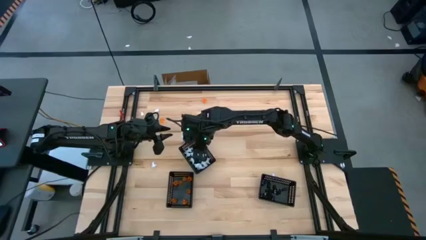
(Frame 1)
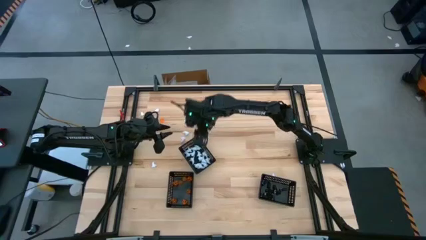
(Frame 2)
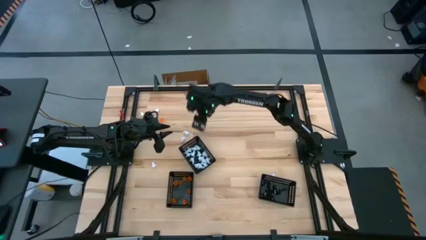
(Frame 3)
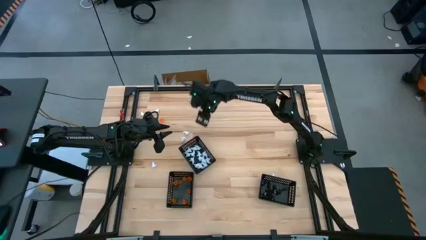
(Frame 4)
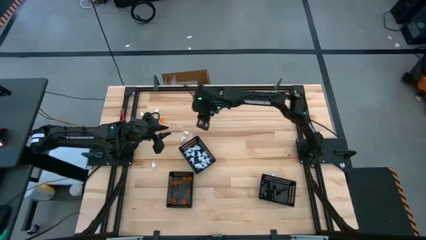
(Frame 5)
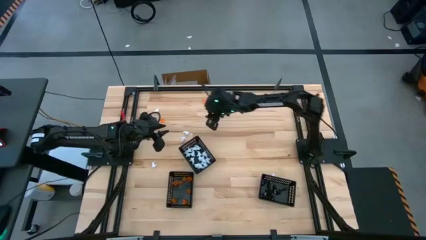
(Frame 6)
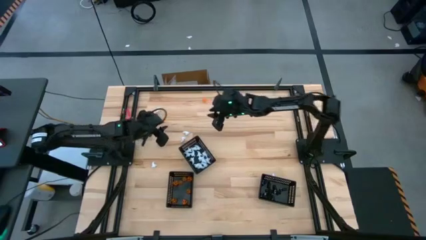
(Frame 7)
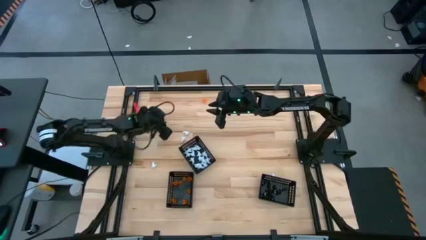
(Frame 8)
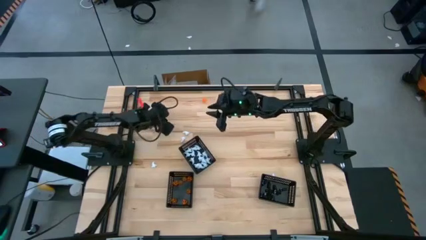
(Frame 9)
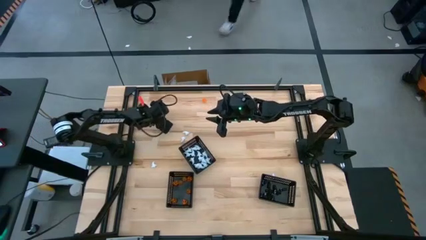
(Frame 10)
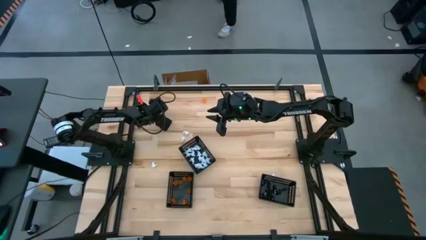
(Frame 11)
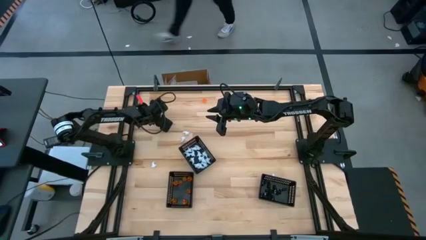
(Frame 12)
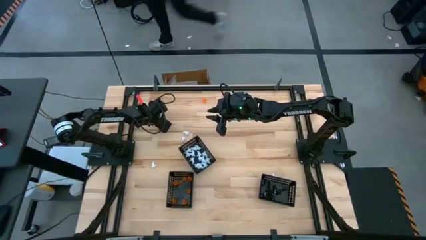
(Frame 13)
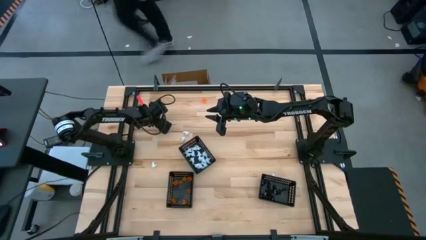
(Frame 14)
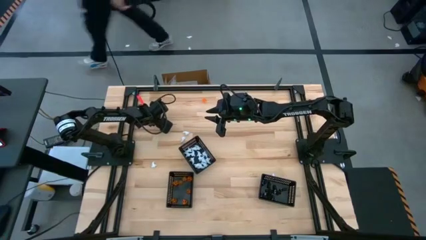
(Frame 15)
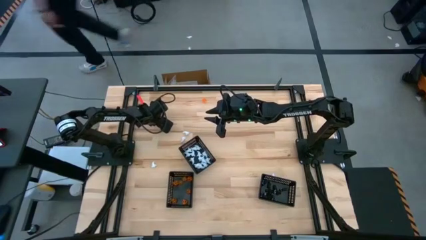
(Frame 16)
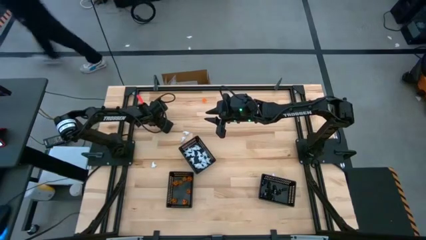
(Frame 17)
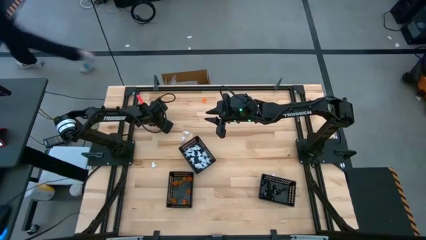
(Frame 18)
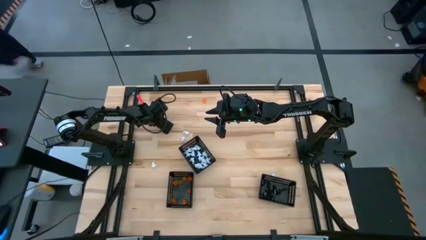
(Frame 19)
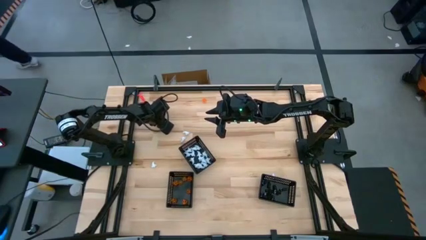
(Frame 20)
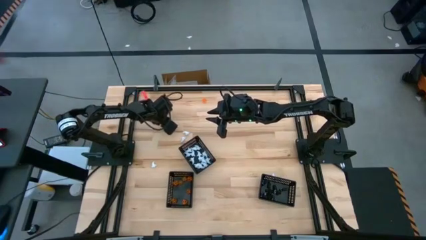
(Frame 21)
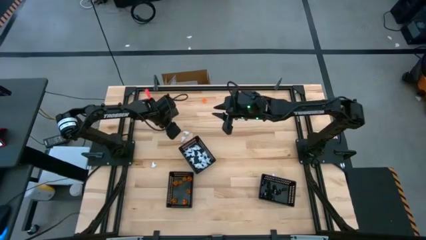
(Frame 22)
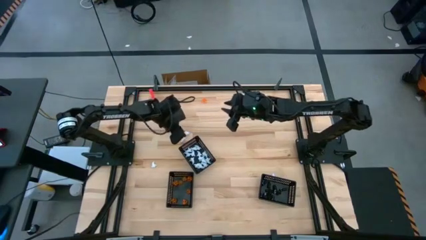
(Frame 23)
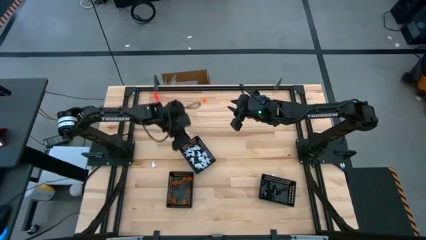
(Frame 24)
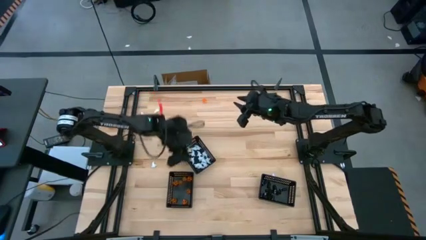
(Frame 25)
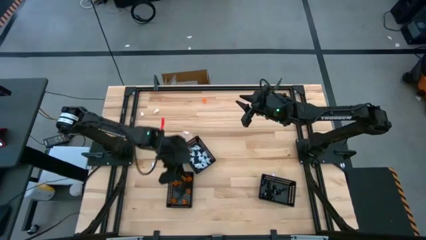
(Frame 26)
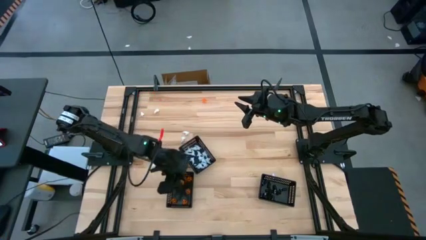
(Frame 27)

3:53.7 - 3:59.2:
Task: Sort Halloween decoration
Put the orange pumpkin toy into the left black basket

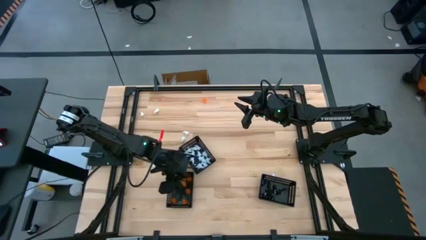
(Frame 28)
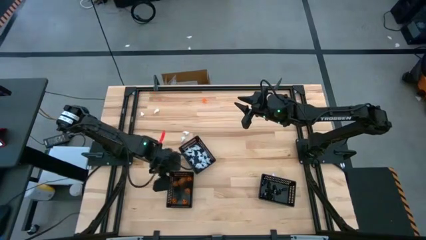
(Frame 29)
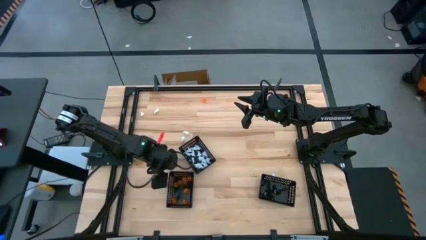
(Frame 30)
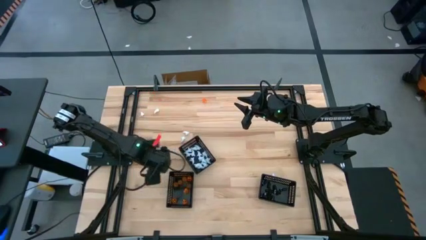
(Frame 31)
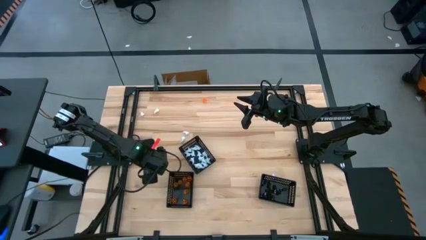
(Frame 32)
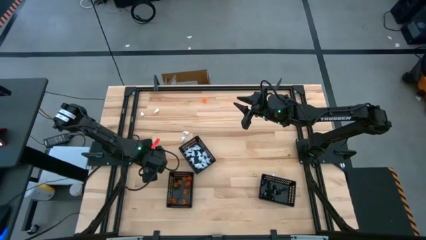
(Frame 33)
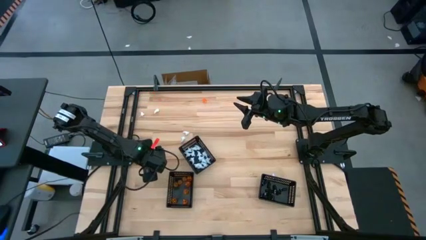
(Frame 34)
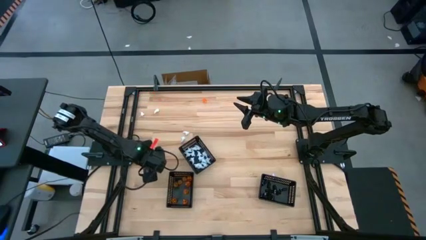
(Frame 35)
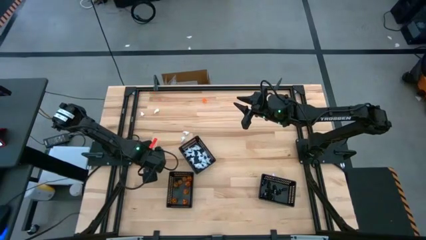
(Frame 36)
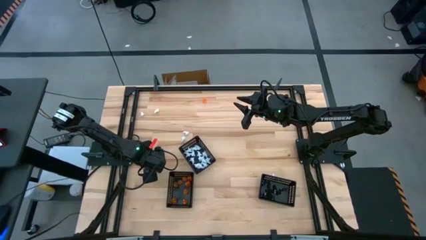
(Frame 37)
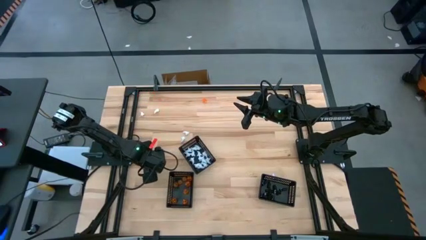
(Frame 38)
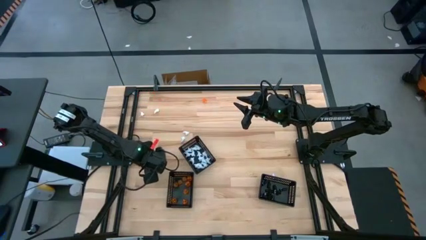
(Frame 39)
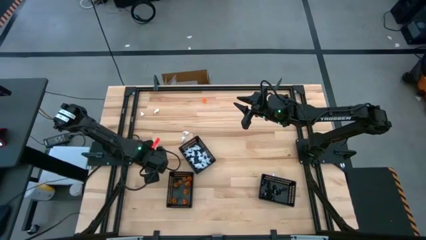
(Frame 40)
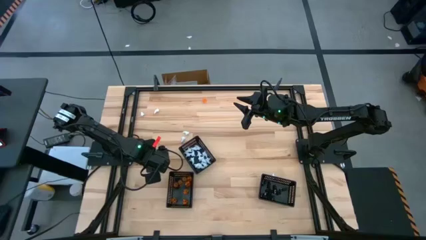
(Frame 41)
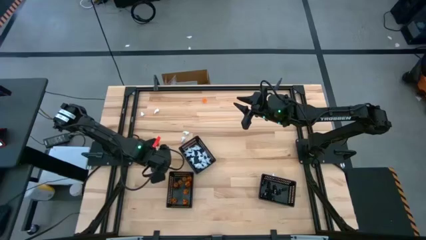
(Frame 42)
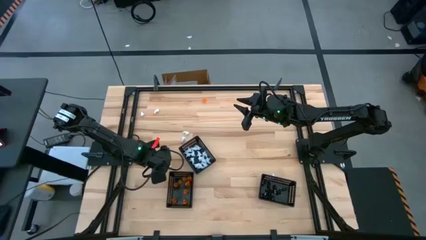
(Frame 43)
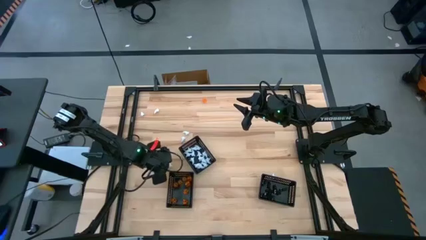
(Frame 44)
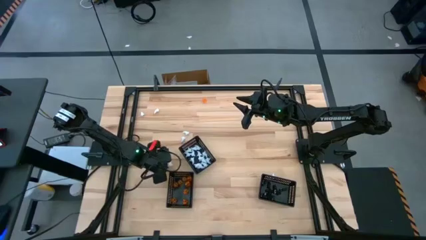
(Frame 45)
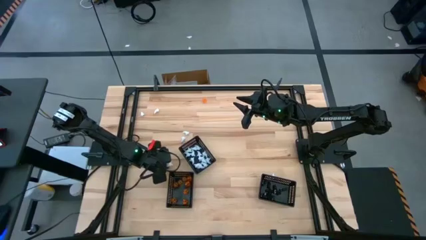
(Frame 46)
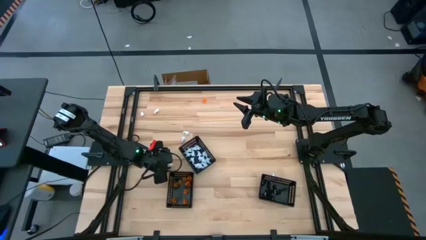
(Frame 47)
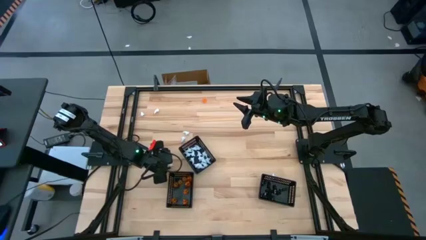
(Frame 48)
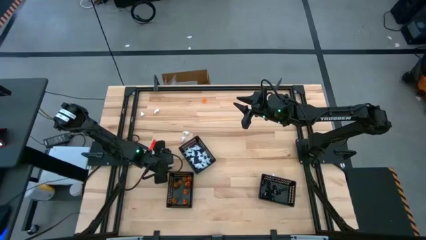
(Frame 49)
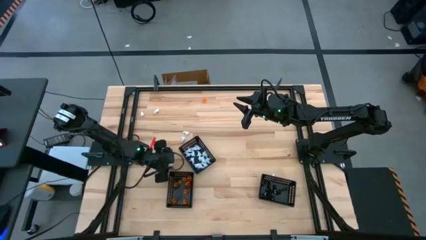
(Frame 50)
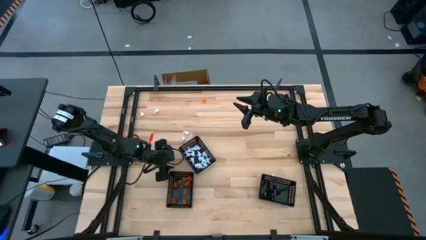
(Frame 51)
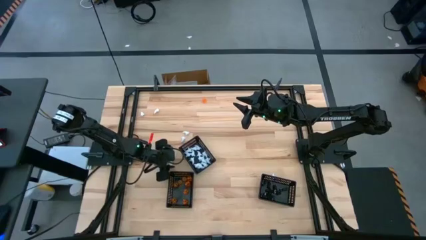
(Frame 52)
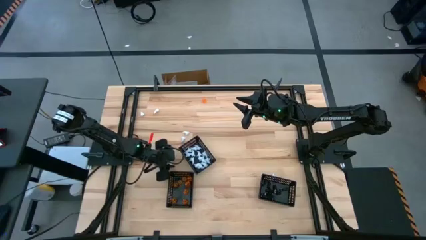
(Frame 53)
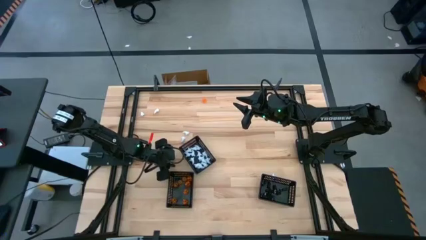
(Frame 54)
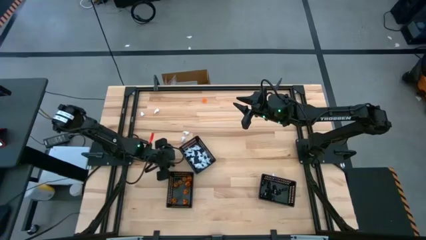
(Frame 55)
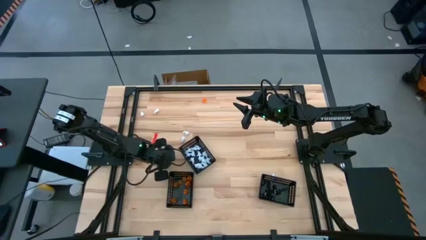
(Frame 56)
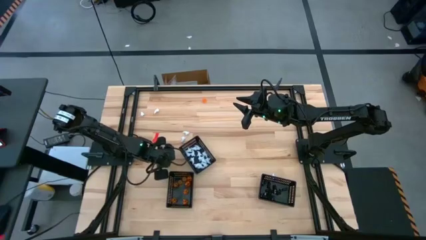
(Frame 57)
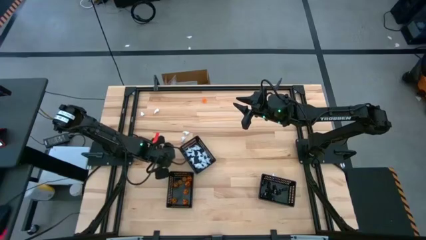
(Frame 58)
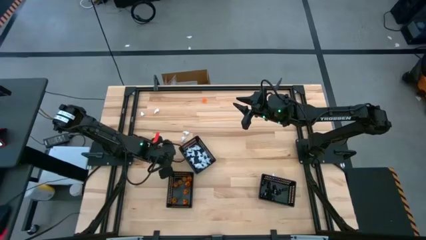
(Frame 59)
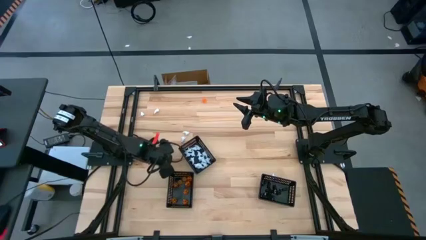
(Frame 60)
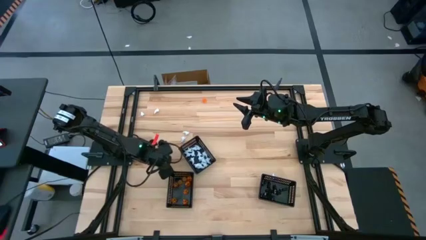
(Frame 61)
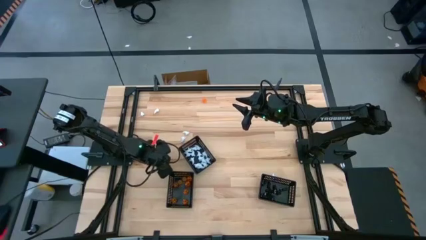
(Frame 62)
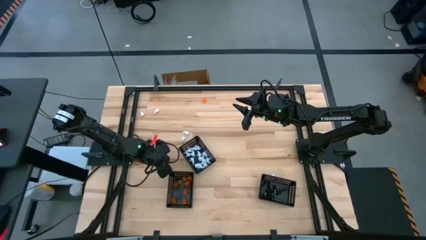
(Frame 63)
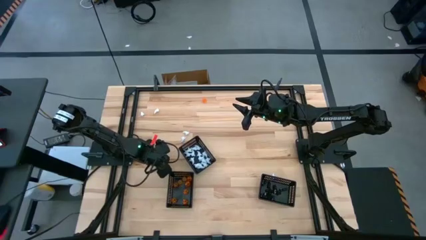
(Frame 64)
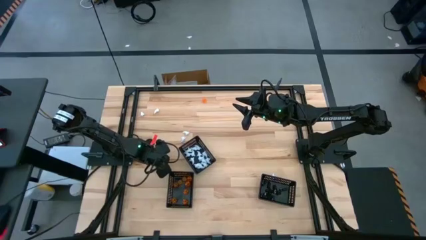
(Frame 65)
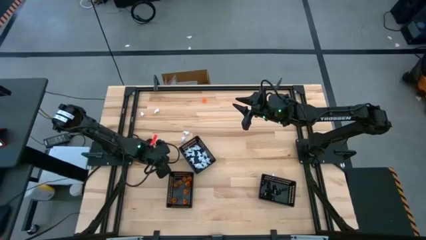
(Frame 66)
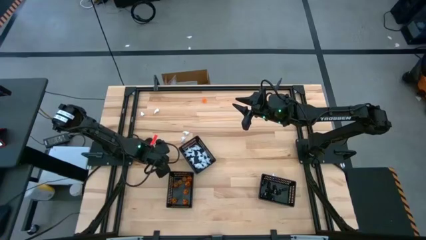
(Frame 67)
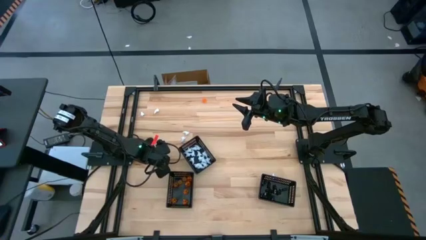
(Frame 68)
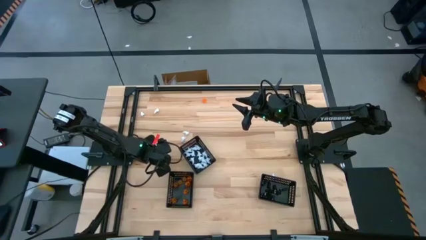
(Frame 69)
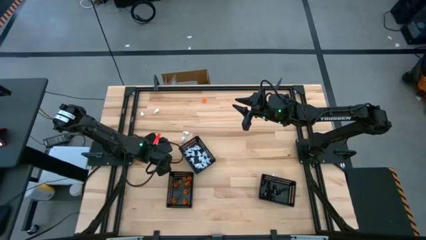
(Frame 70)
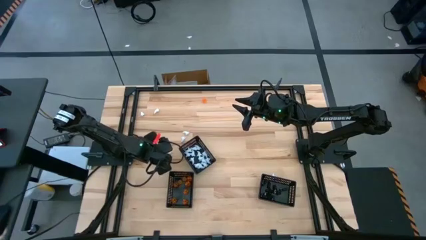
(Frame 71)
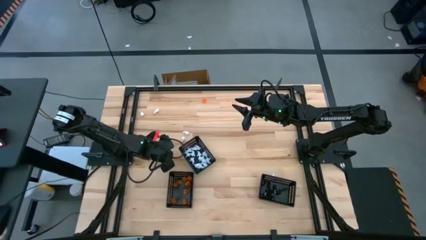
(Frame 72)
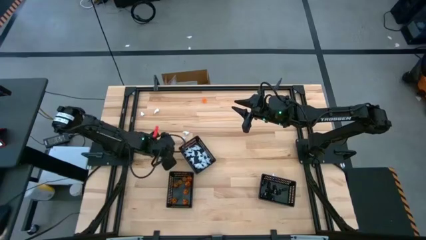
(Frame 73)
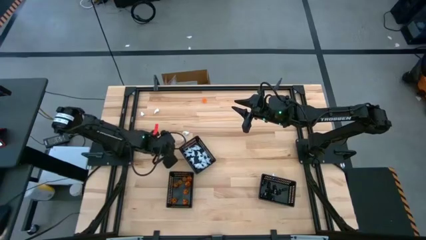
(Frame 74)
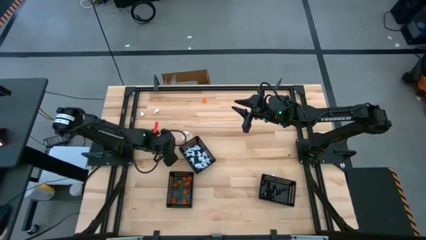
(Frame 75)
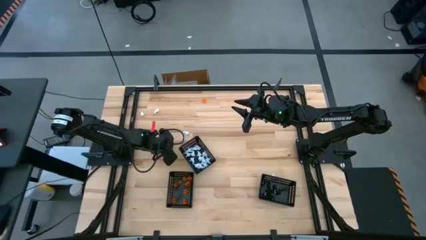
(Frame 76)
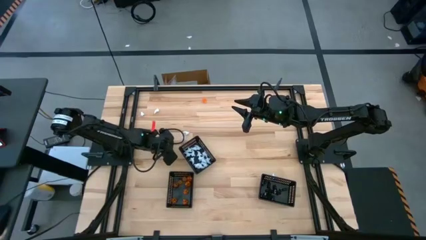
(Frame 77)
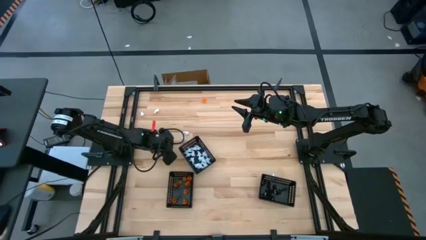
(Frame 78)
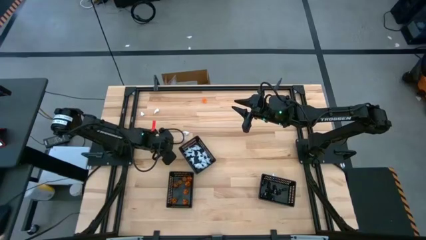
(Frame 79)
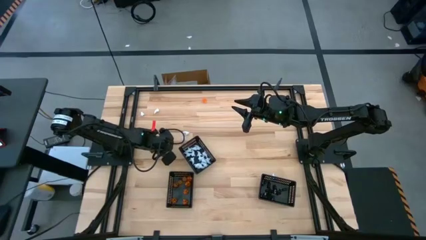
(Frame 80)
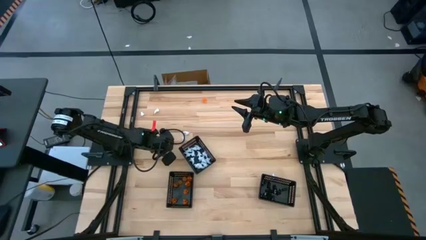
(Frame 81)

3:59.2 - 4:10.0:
Put the white ghost toy into the middle black basket

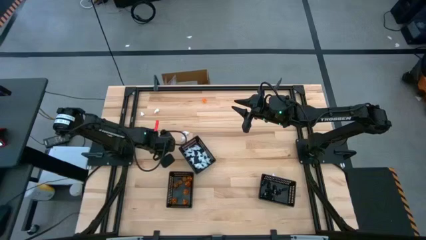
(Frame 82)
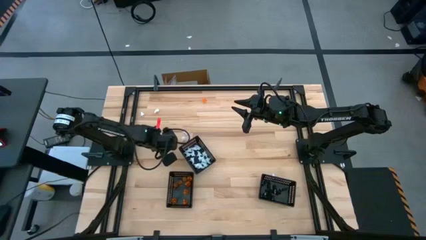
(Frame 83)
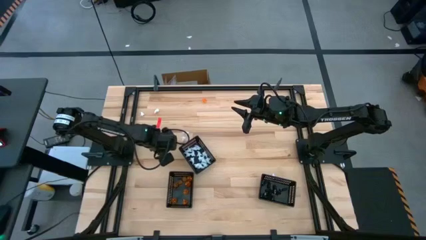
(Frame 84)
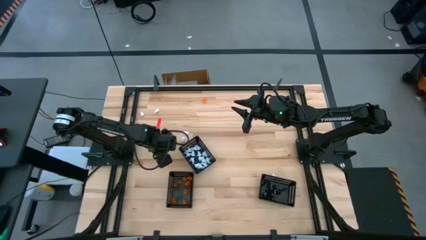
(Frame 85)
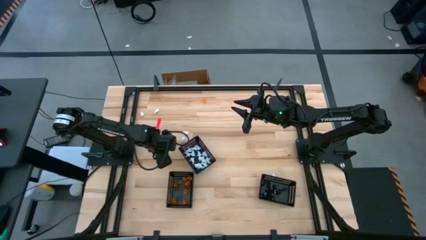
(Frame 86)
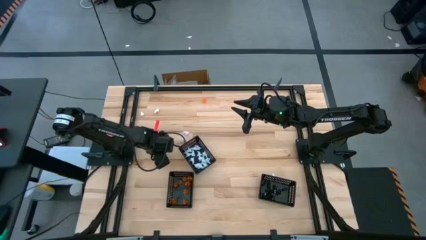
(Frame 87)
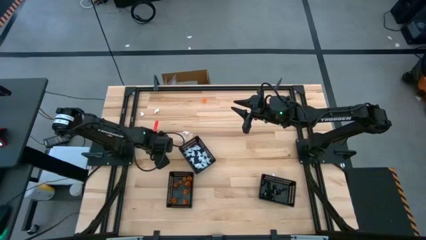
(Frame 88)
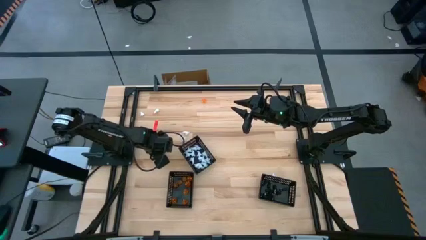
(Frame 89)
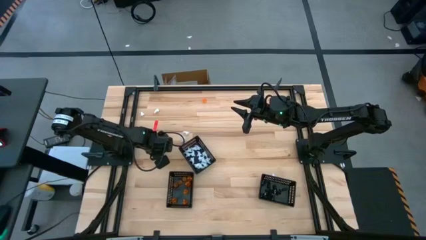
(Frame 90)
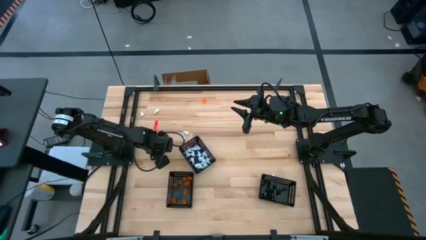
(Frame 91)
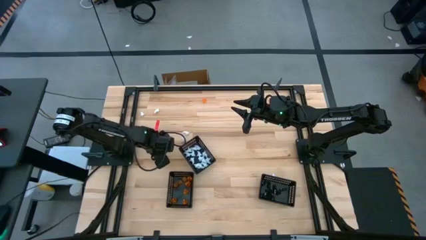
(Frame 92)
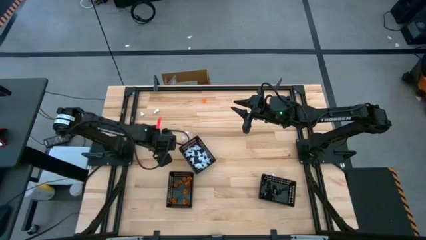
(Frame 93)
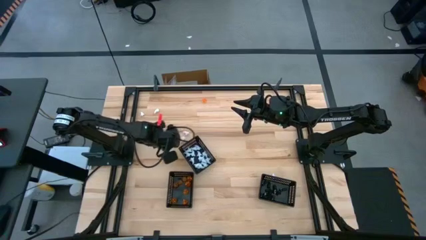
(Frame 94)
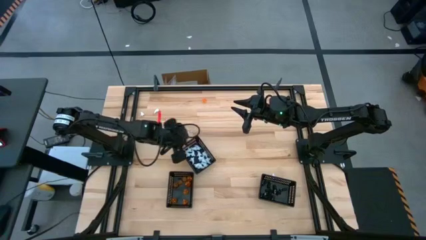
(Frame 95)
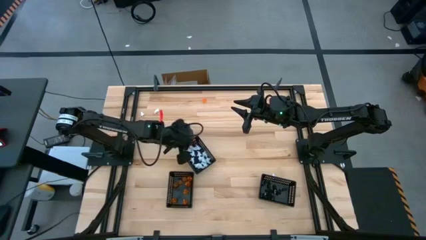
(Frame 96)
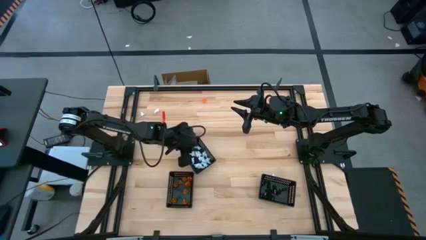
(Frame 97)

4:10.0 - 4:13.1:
Put the white ghost toy into the middle black basket
